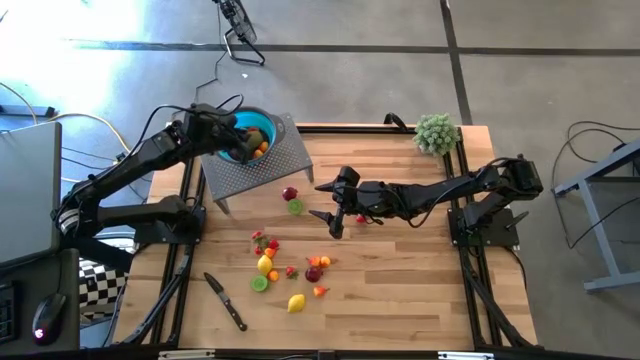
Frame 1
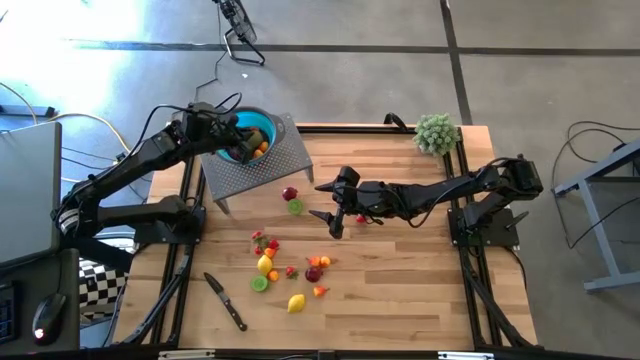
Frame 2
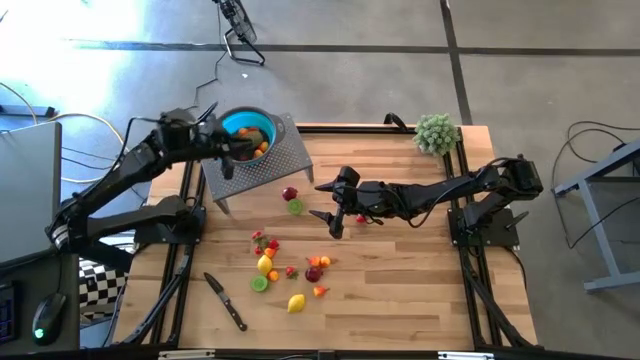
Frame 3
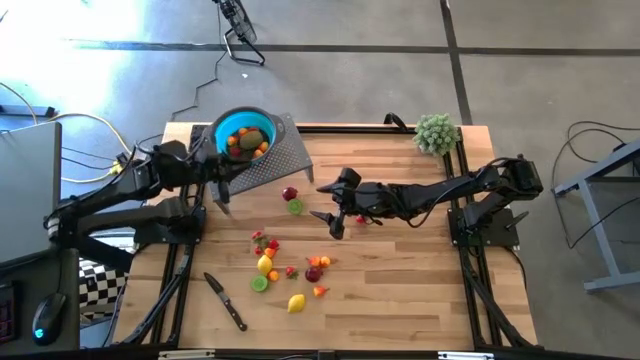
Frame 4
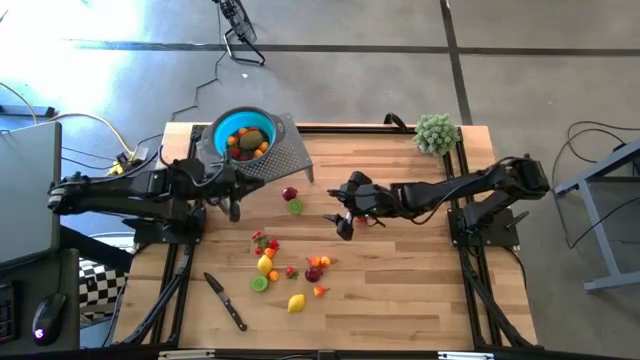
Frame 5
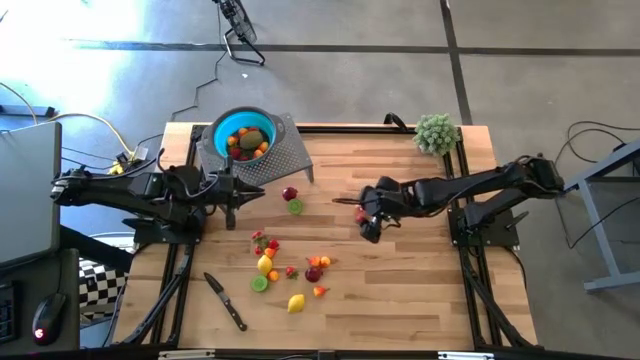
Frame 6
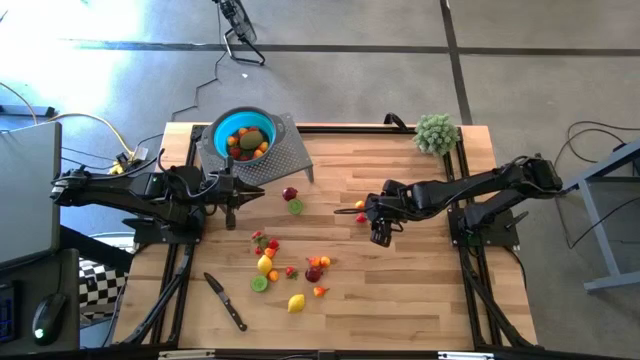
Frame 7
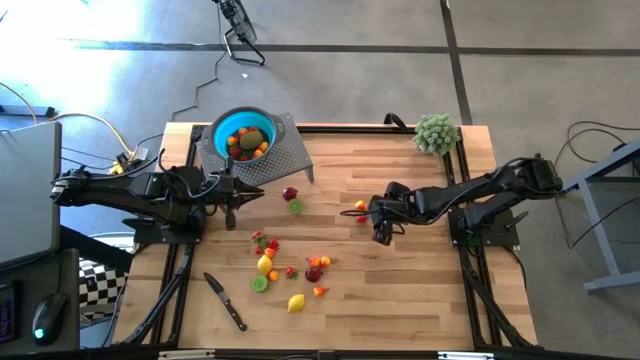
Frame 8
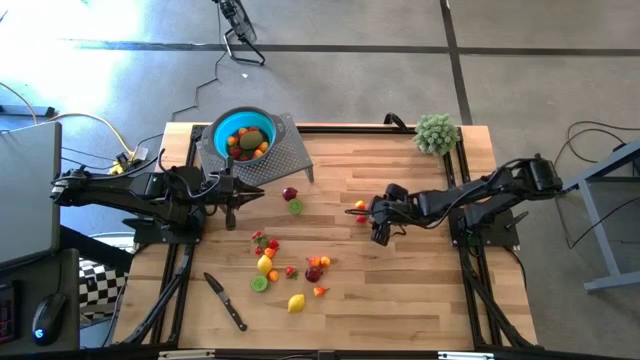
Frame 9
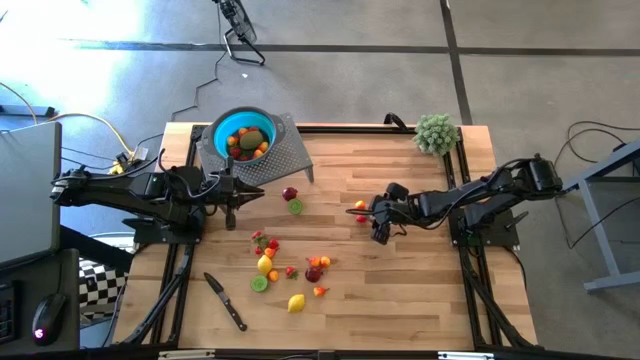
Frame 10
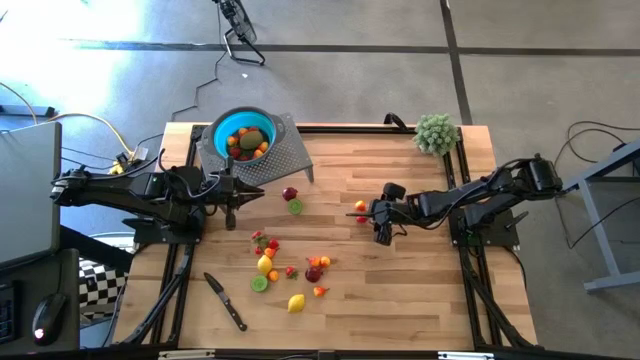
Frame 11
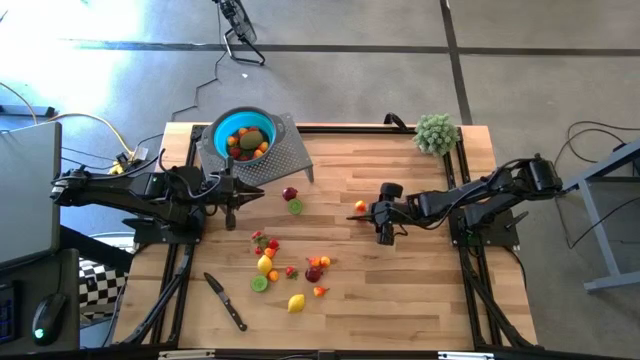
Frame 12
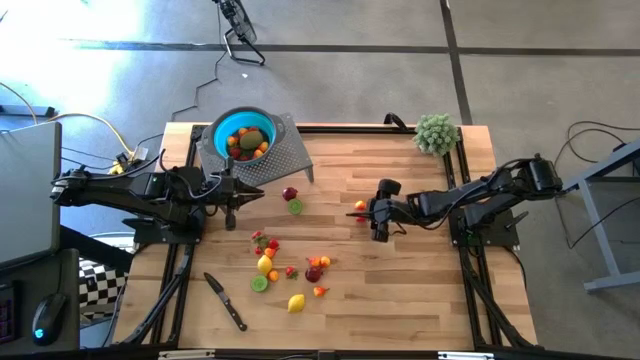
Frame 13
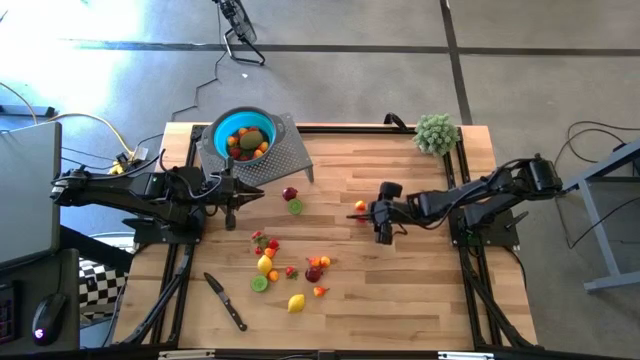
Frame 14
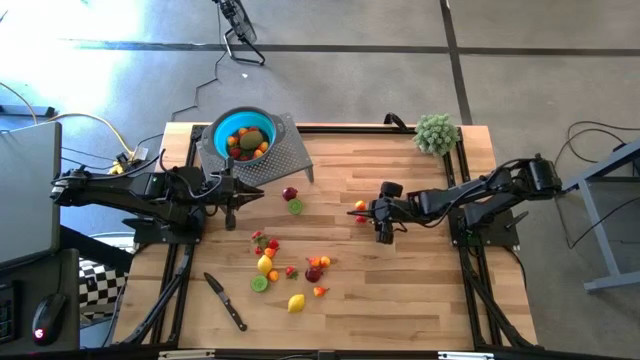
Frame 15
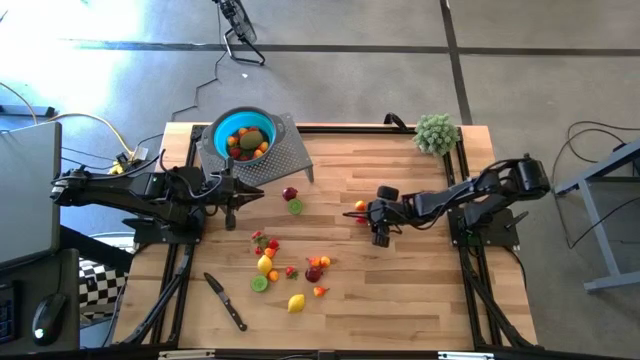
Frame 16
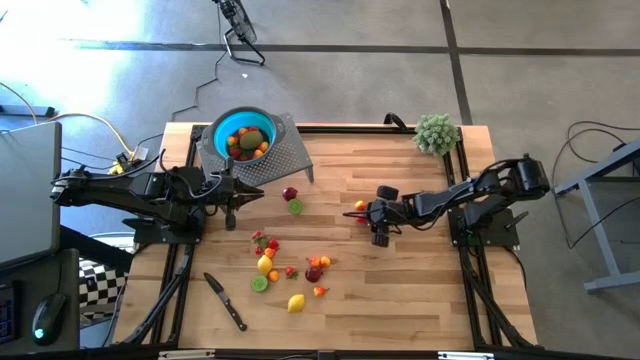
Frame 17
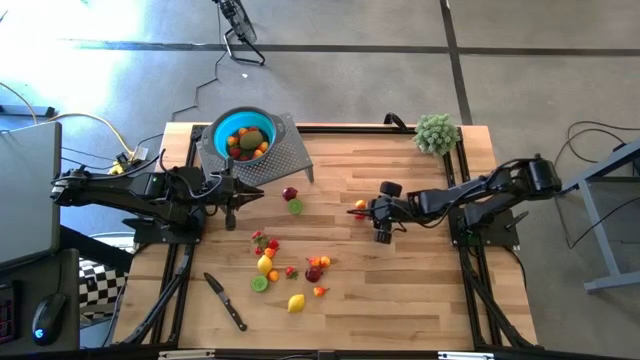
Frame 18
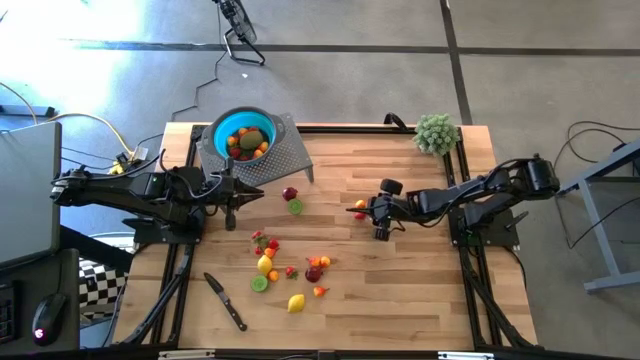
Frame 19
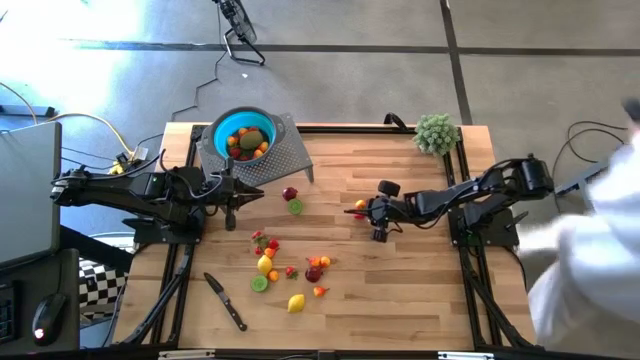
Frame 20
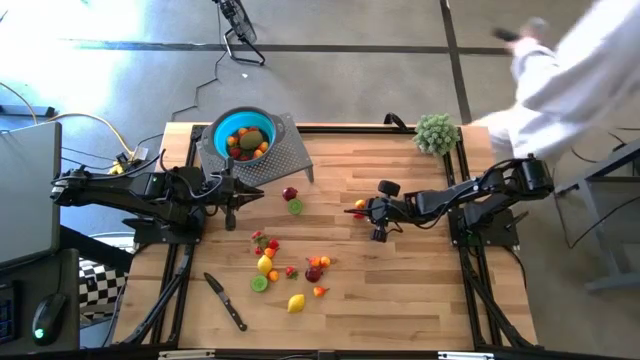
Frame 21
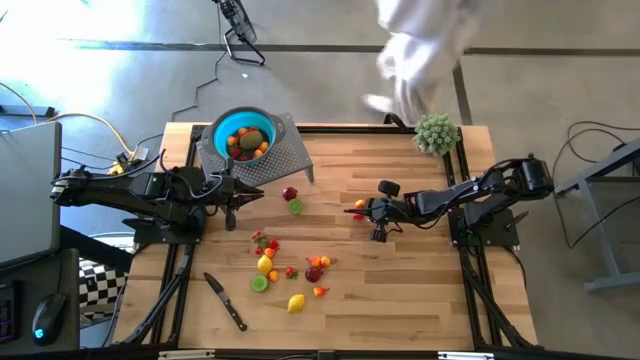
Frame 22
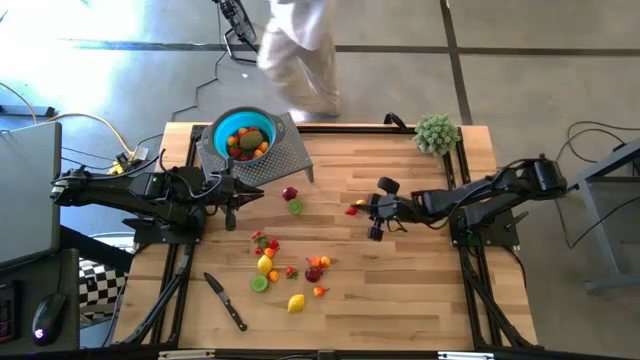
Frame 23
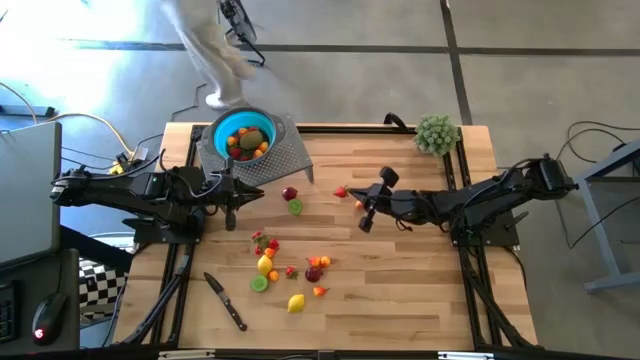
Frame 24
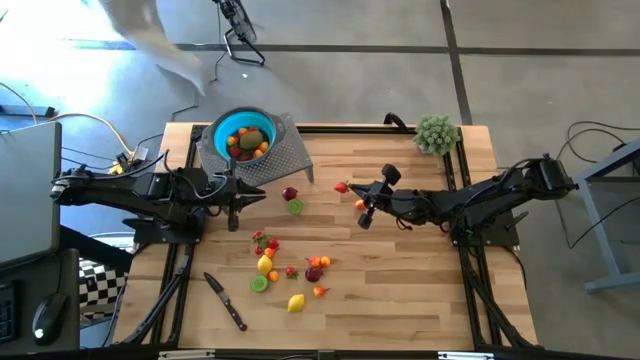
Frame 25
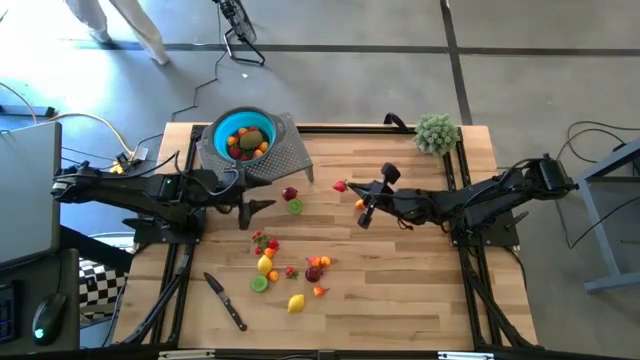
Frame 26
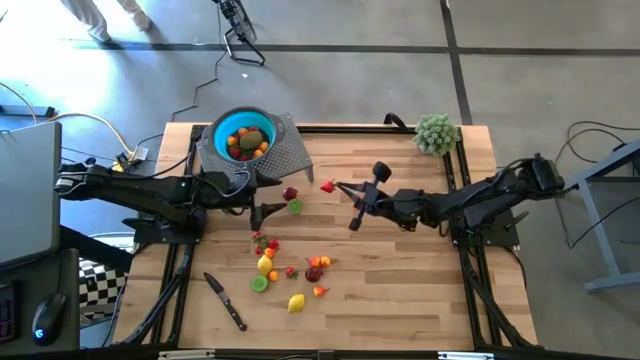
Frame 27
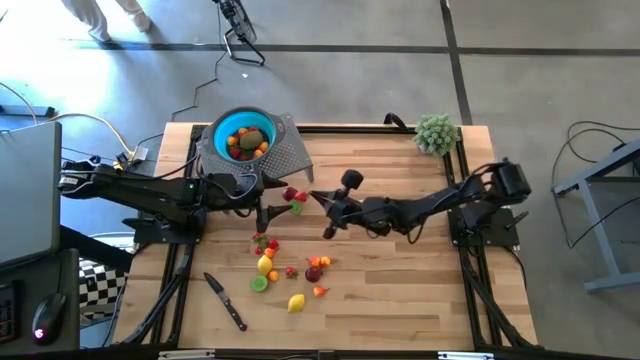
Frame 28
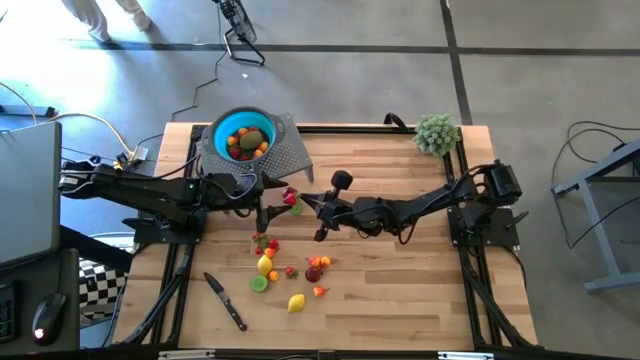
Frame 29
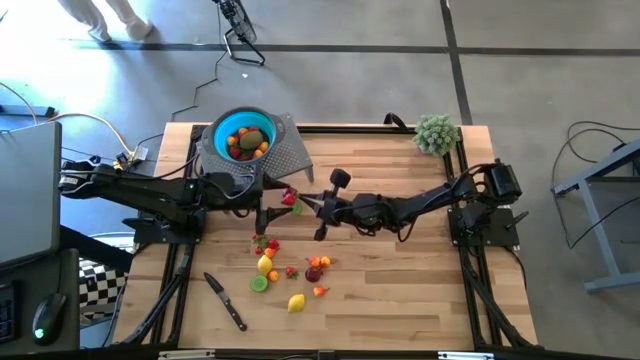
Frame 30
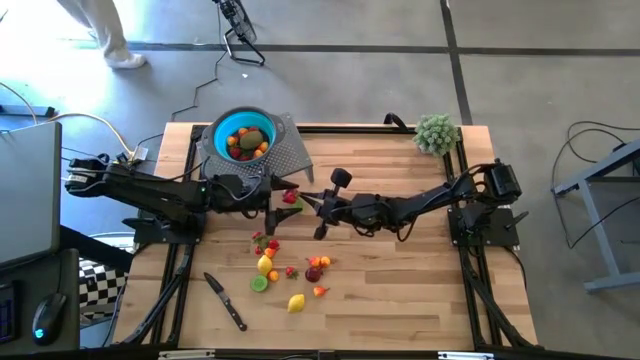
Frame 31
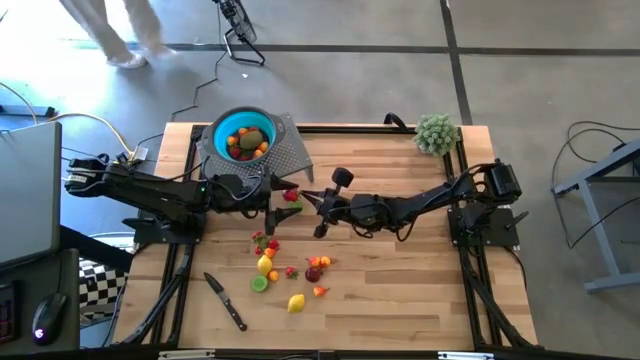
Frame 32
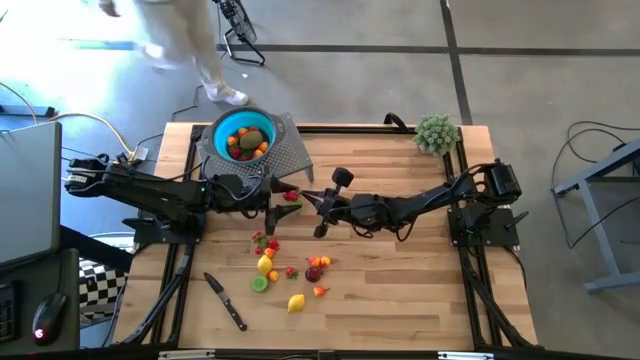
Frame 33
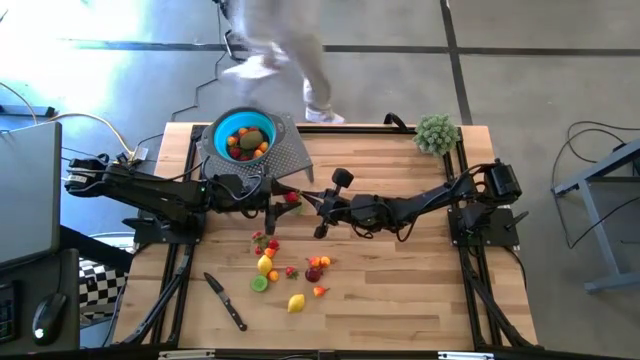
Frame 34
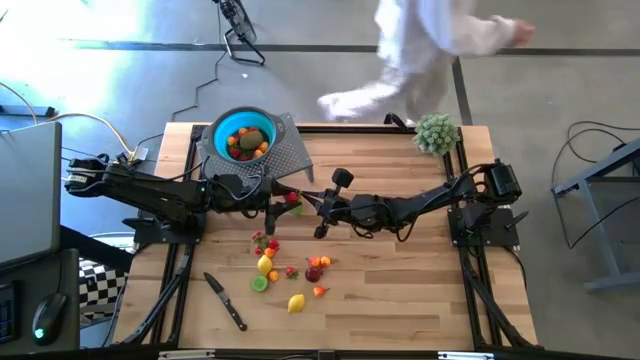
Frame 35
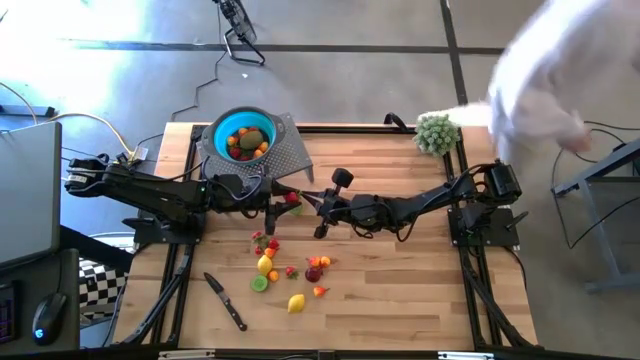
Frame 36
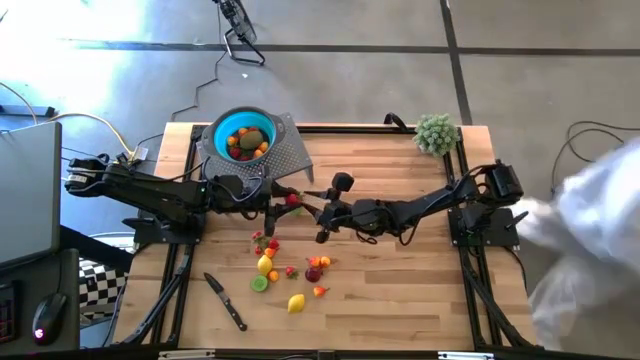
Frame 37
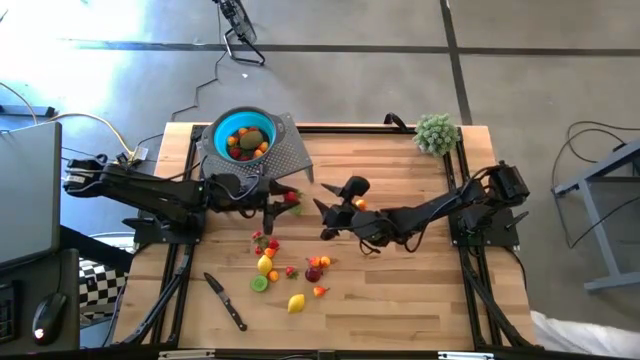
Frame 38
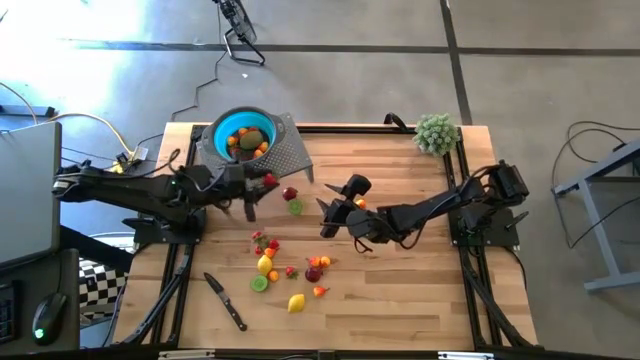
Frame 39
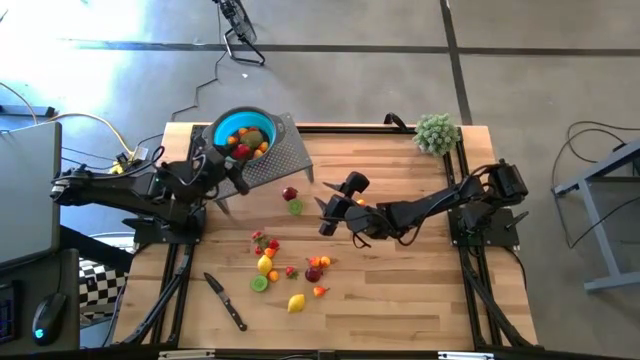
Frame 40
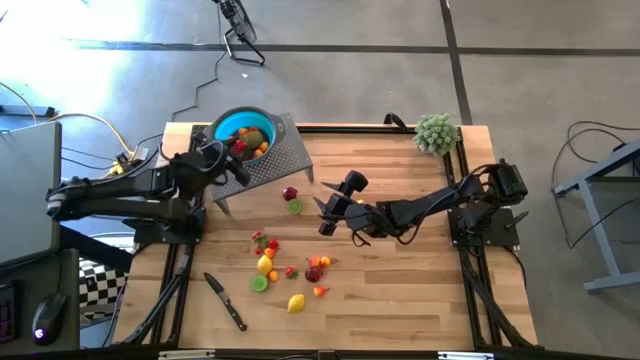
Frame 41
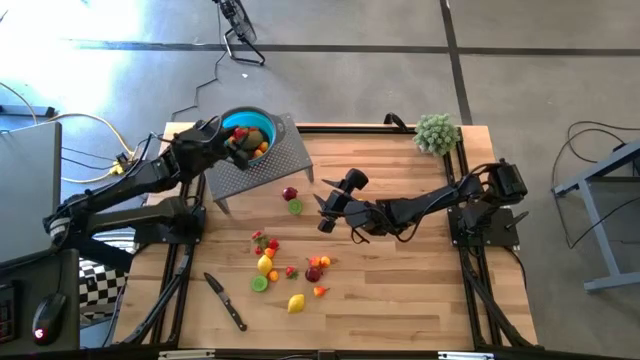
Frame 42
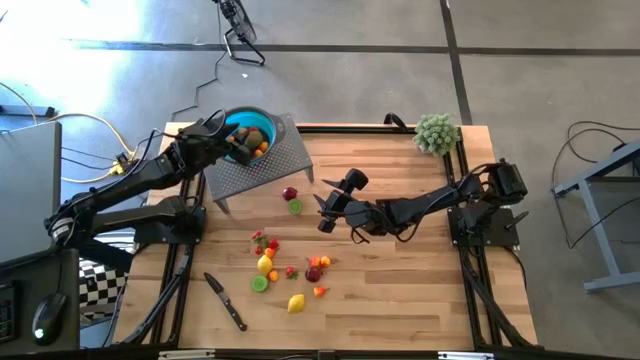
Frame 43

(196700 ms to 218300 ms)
Task: Pick & Place Fruit
Put the red strawberry into the blue strainer bowl on the shelf
